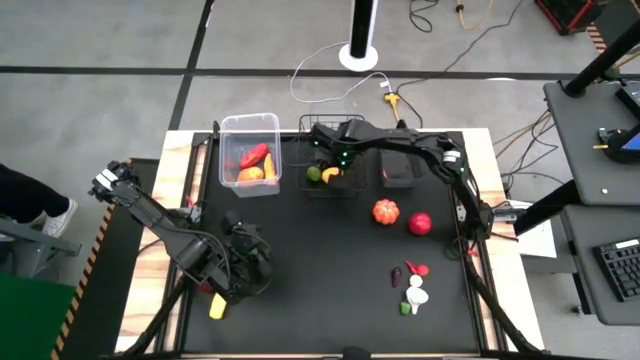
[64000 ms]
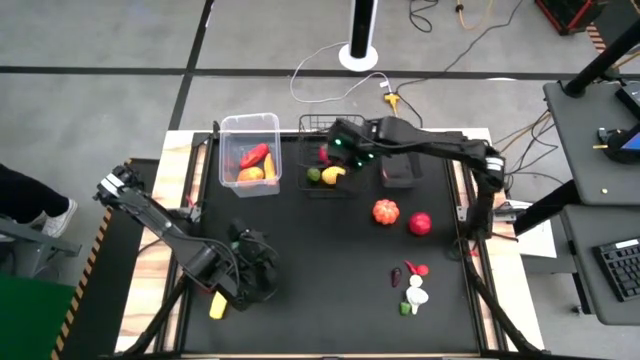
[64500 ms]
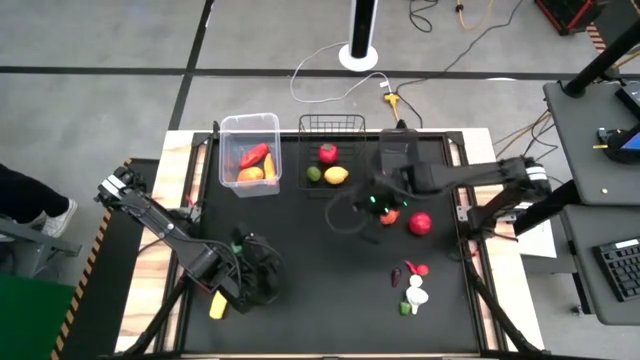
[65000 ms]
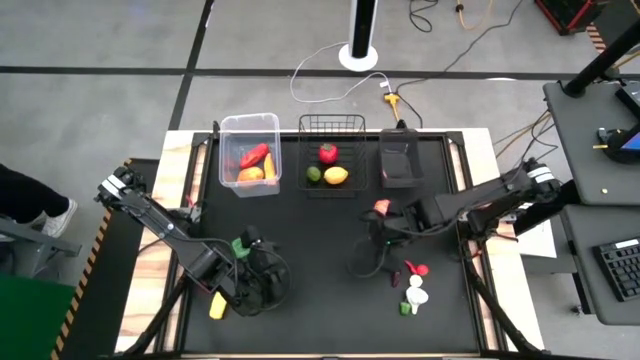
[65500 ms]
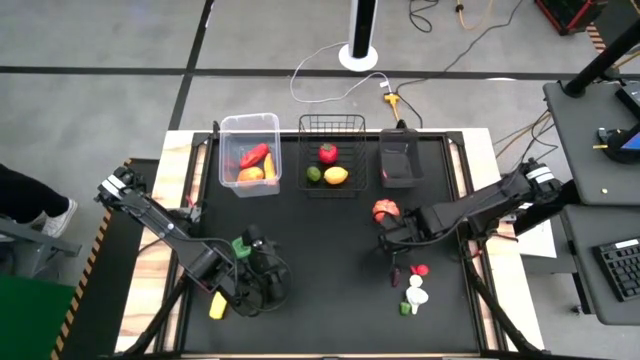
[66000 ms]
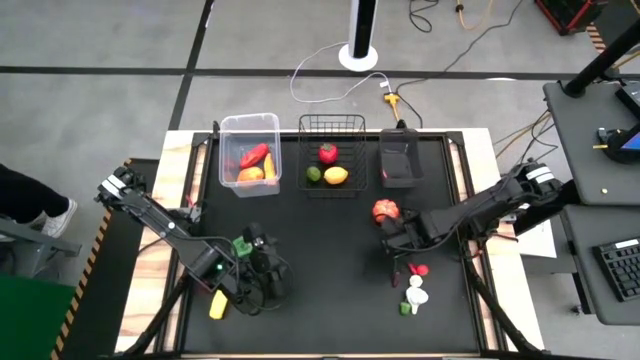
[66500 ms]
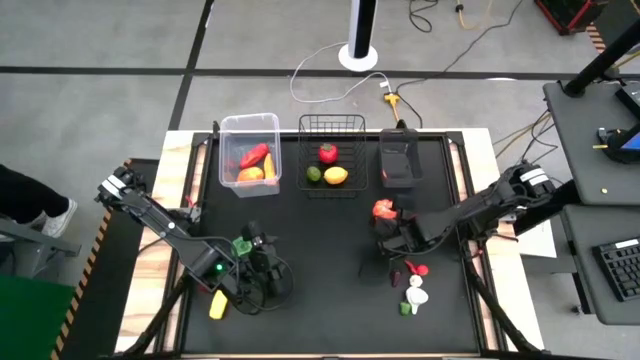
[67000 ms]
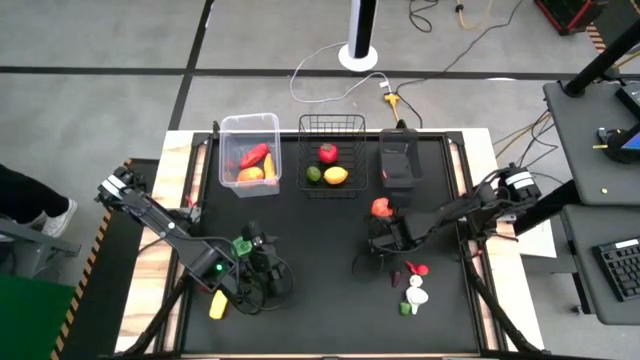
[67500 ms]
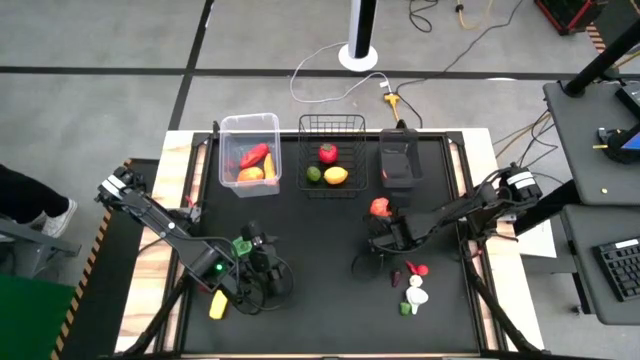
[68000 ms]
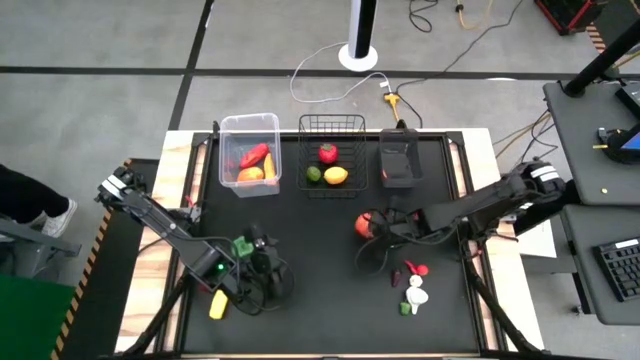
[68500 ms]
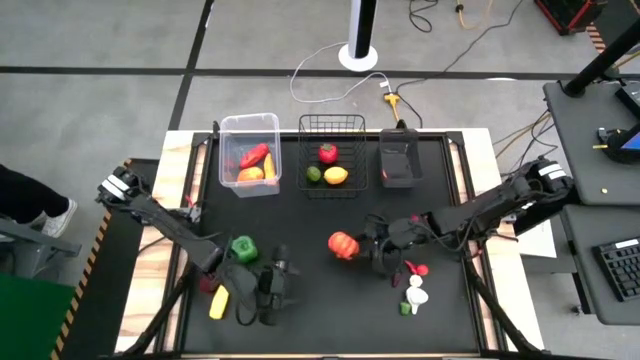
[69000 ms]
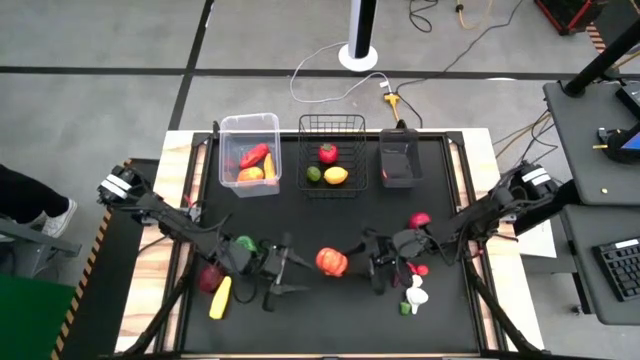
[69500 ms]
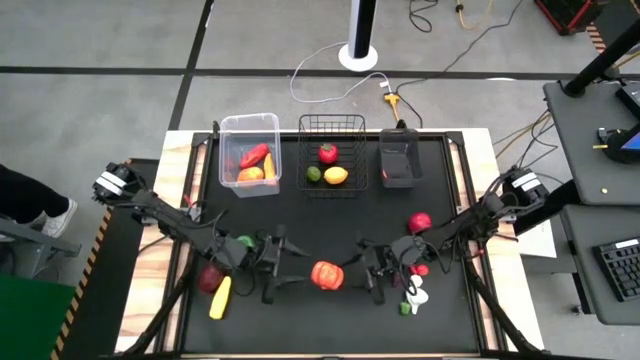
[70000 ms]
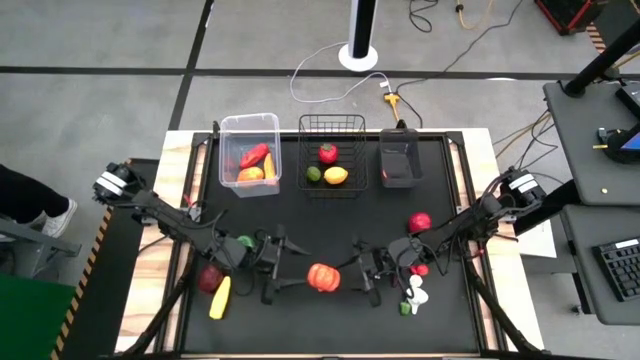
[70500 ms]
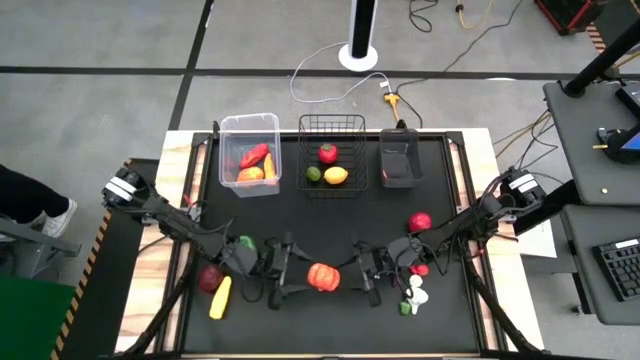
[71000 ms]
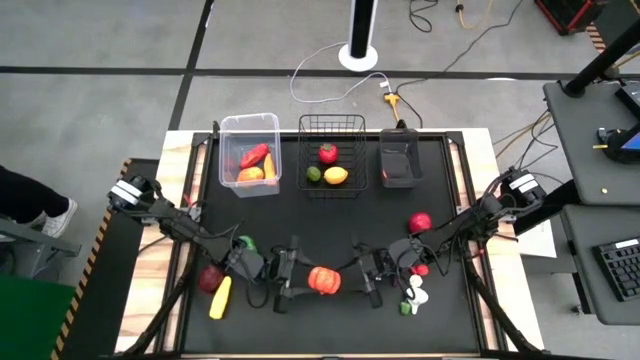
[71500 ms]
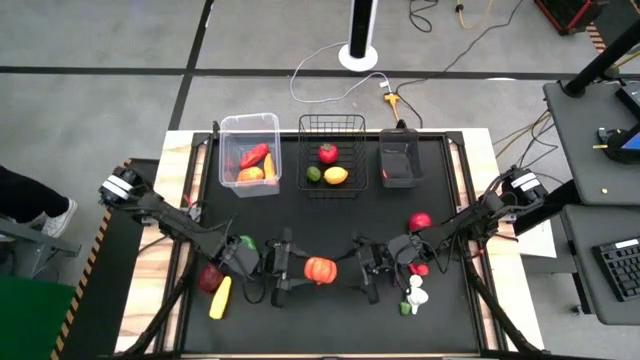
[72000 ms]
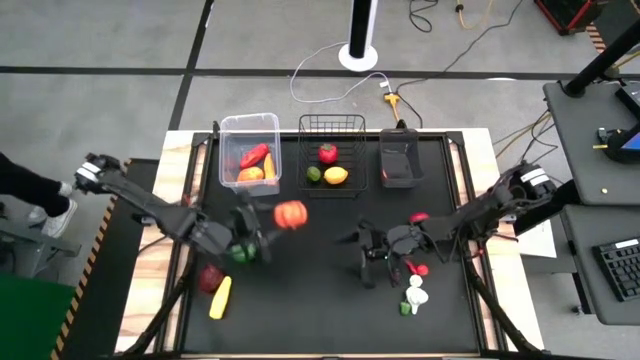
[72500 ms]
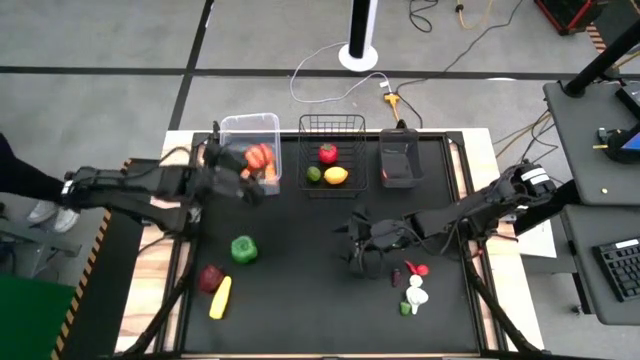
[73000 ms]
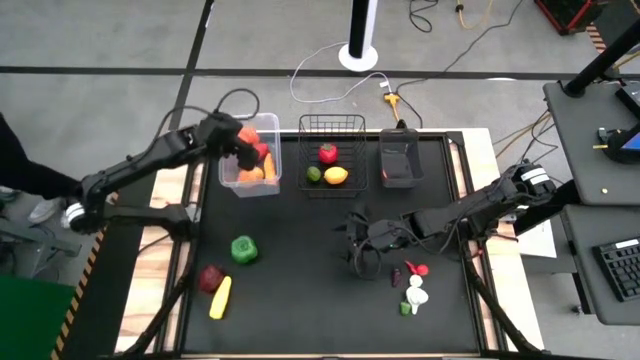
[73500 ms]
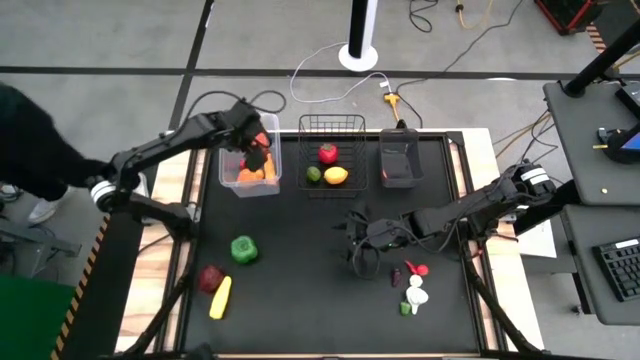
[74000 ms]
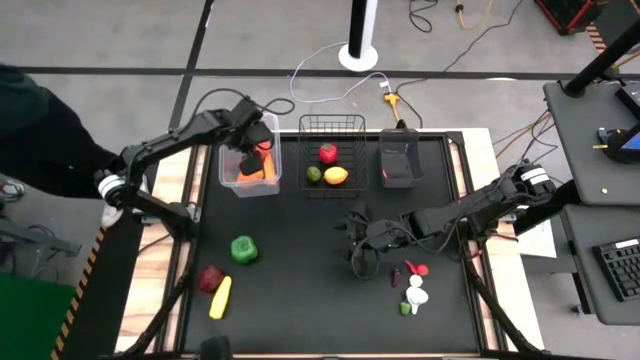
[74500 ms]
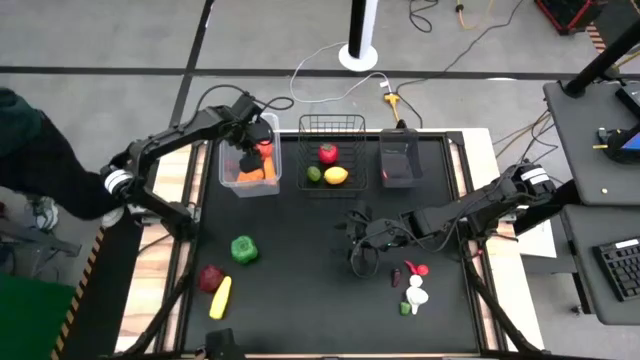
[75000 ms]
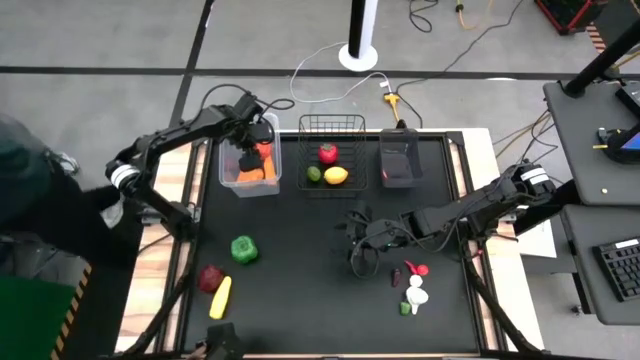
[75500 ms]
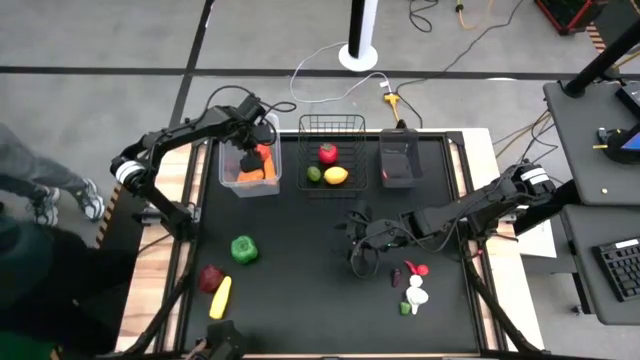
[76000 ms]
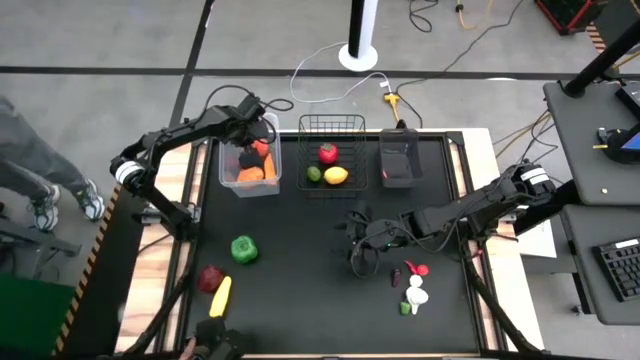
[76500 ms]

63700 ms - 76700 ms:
Task: Sort produce into baskets
Put the pumpkin into the transparent basket

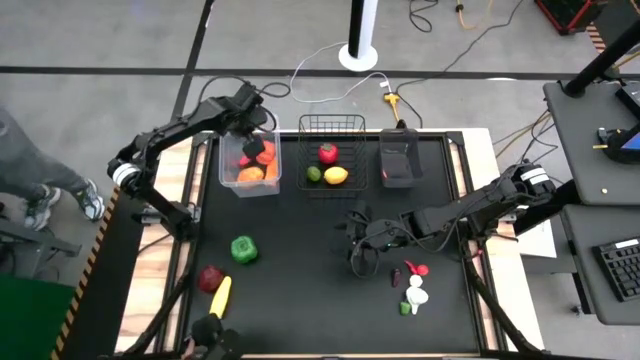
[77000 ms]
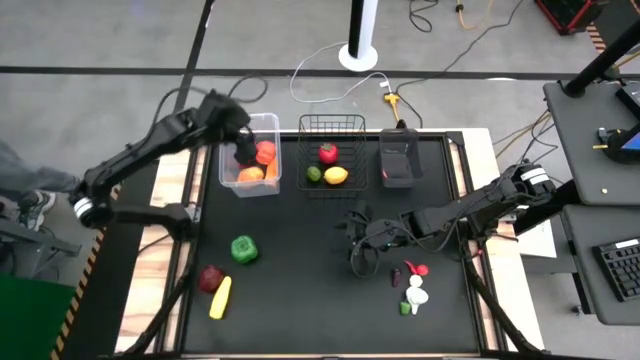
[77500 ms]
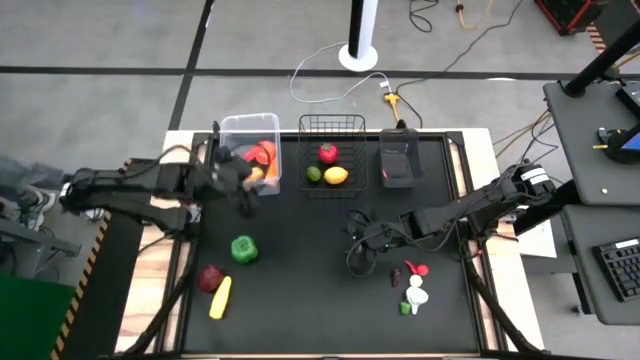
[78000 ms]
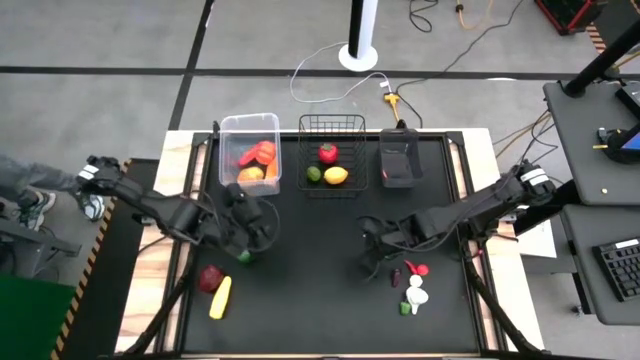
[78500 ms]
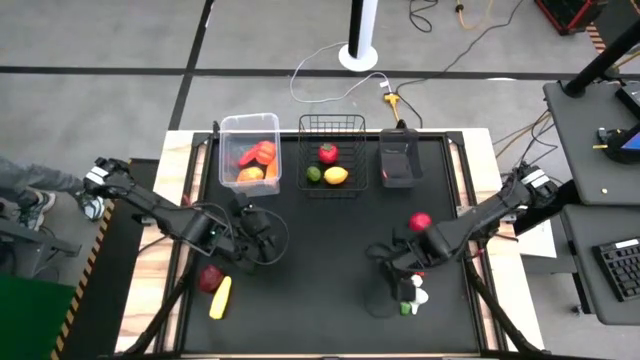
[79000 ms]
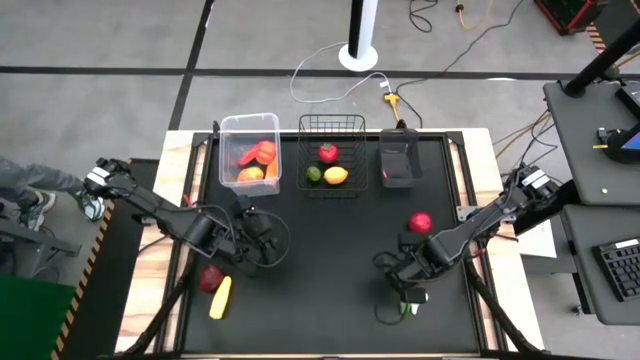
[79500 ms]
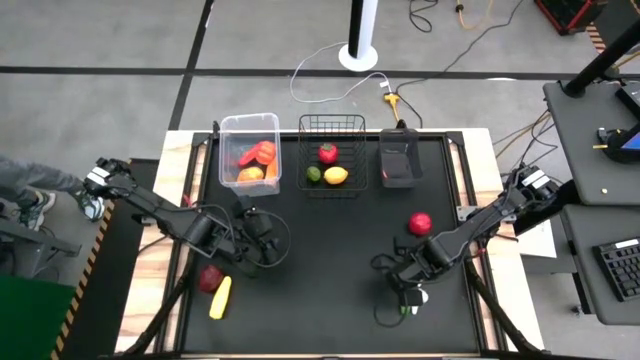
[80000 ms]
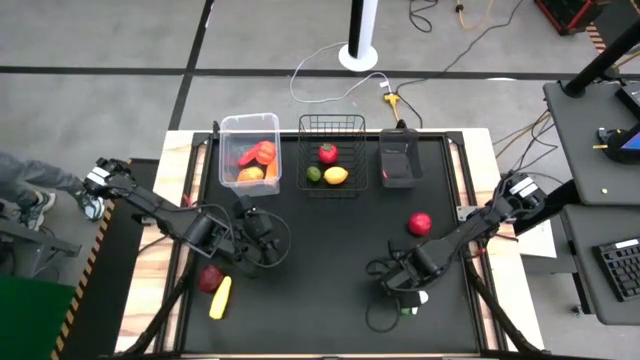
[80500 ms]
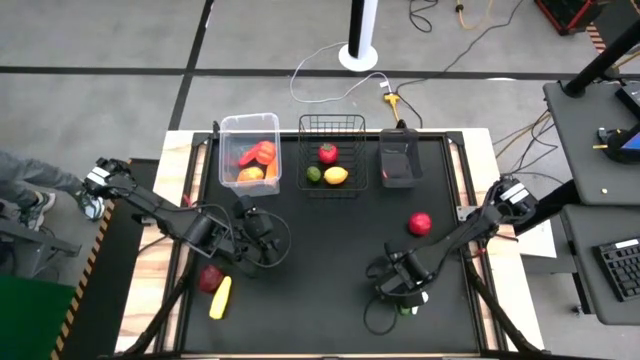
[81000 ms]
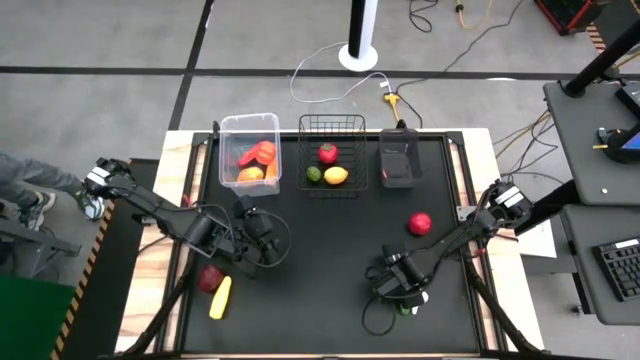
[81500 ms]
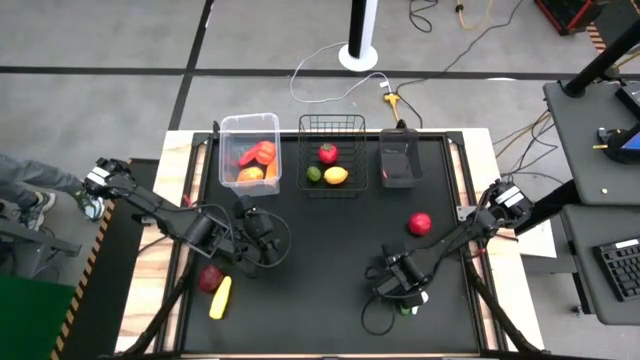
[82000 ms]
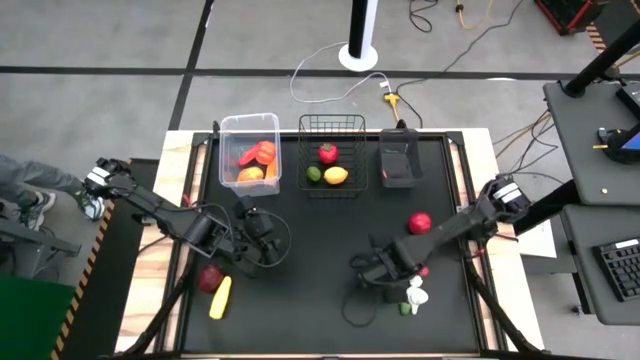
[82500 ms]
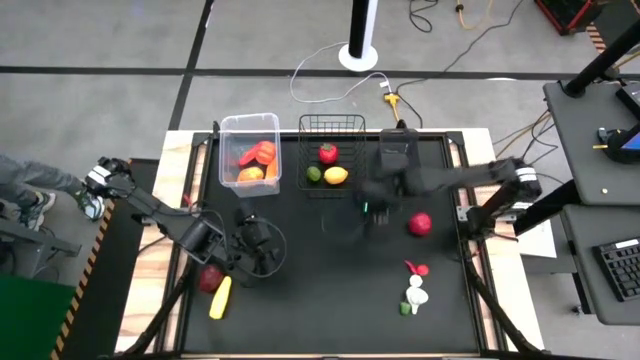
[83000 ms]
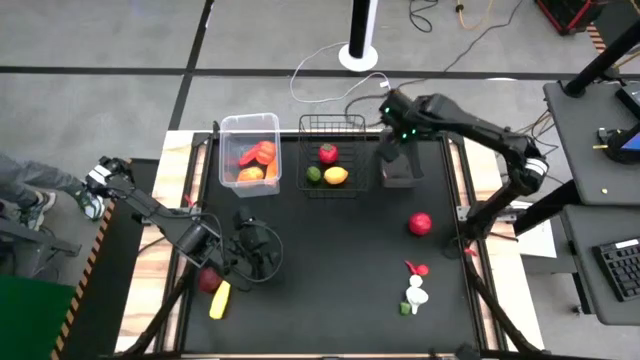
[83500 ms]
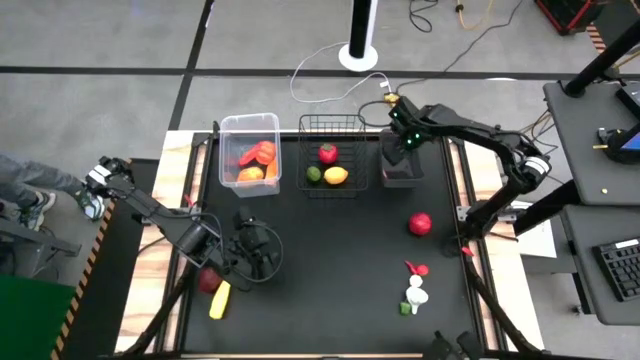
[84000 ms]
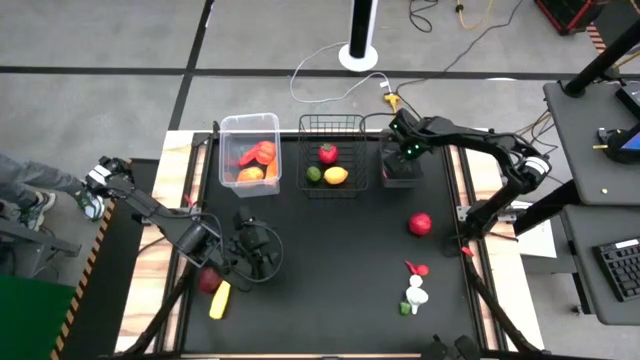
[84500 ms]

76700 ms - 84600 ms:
Put the egg plant into the black basket
